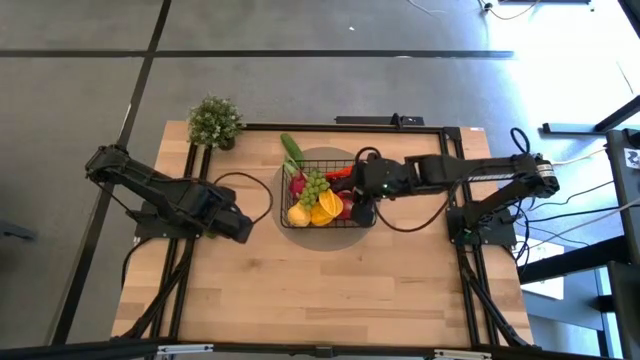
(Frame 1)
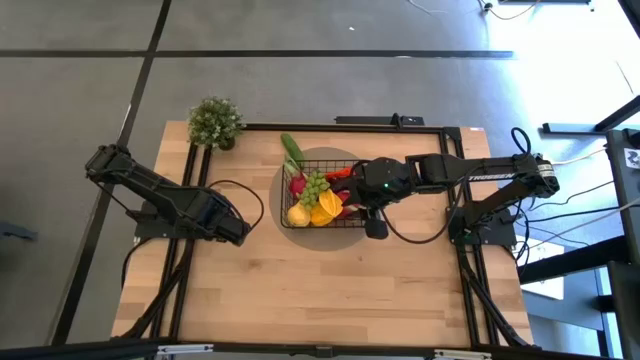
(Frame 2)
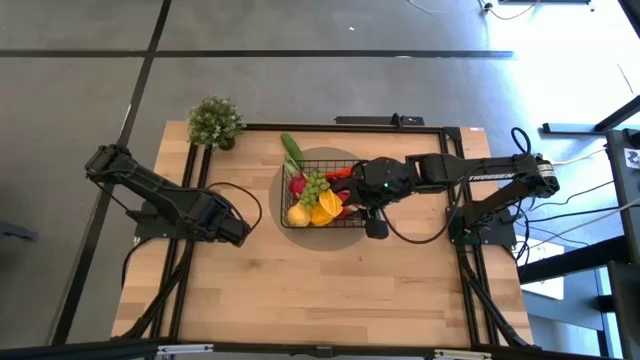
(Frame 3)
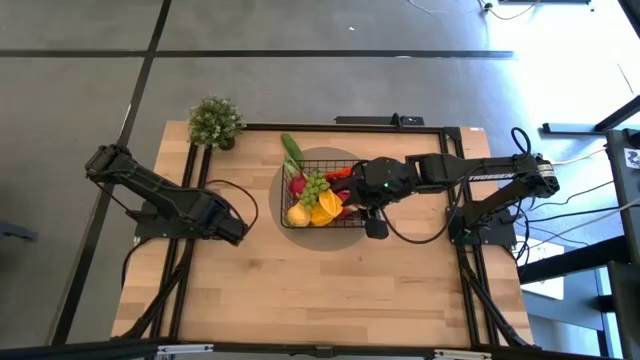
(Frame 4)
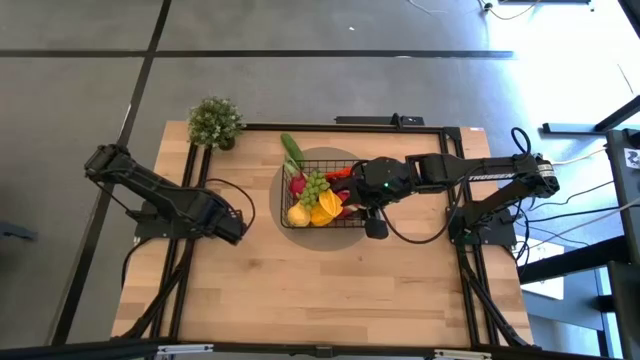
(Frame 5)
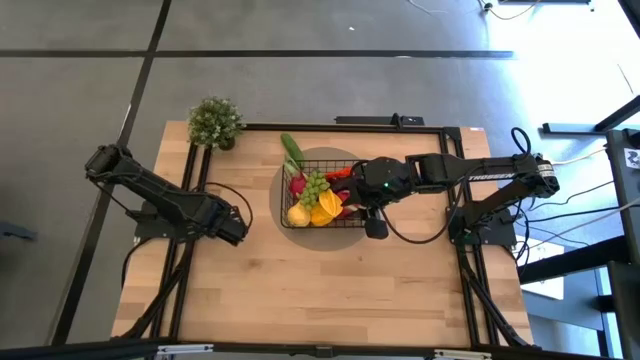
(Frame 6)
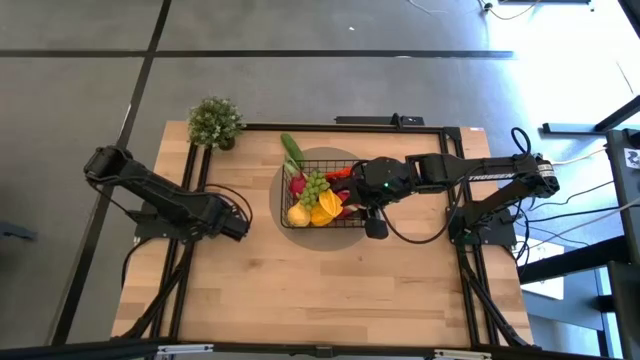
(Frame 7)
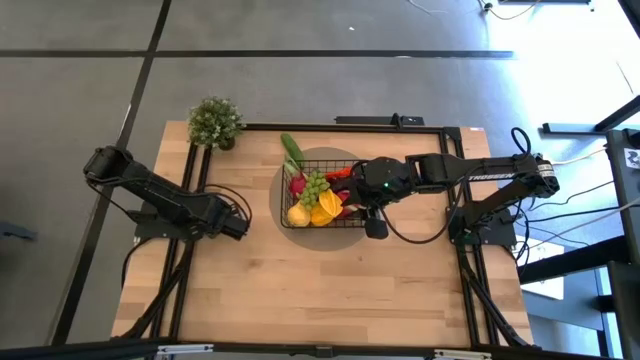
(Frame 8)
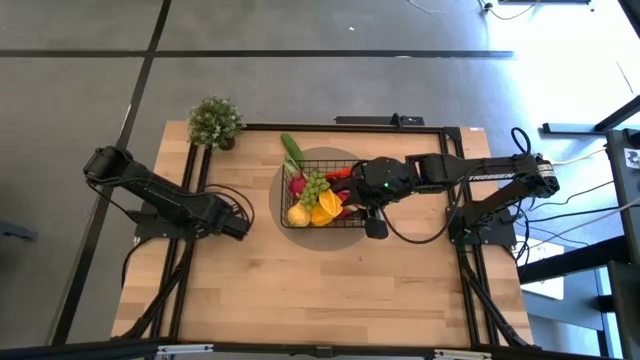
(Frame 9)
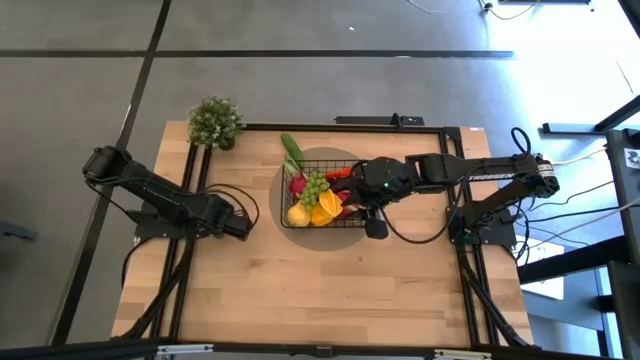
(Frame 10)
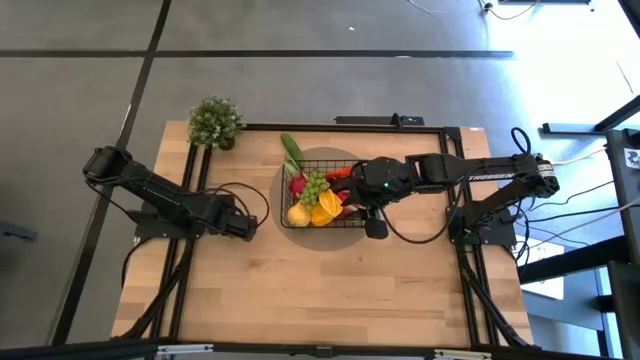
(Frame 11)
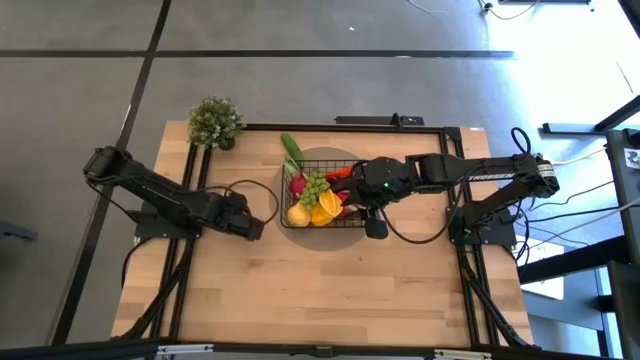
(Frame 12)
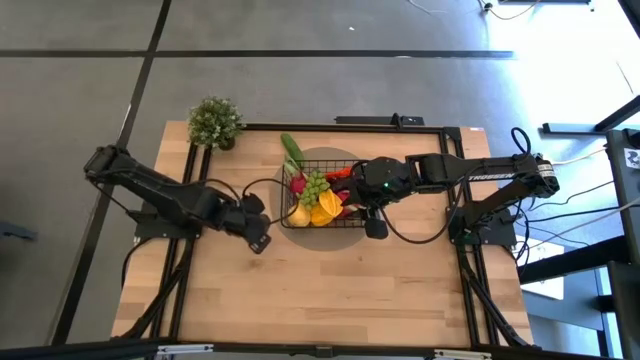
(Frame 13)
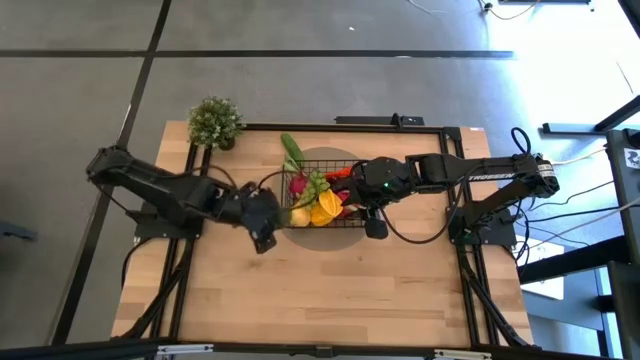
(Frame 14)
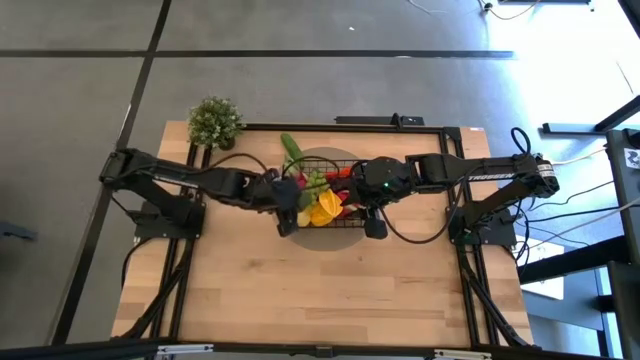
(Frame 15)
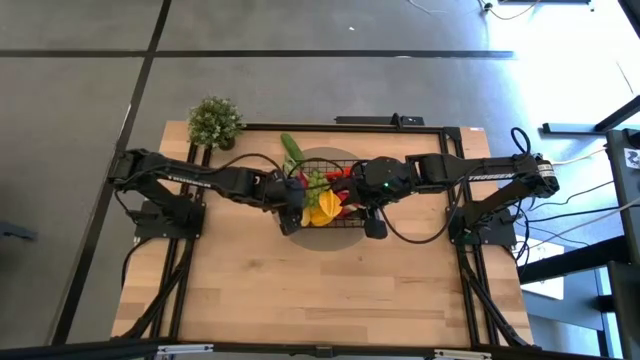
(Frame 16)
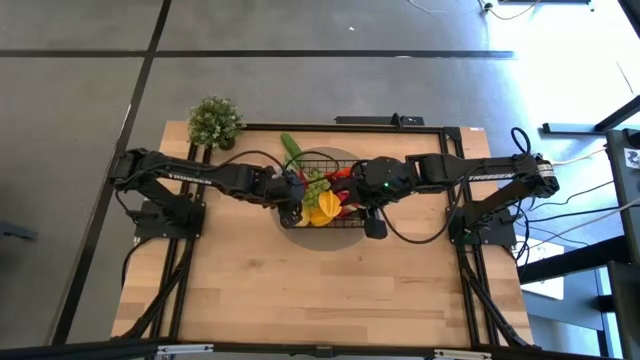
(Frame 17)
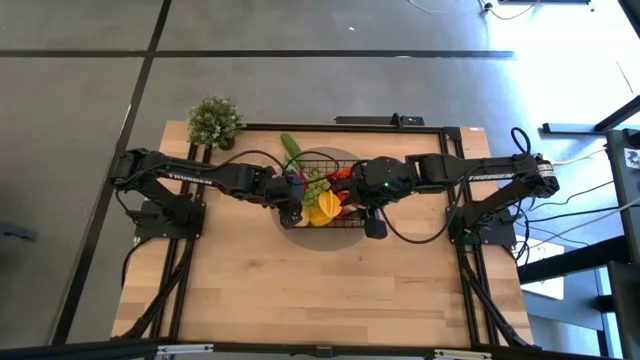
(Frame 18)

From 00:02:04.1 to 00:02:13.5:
Task: Build produce basket
Put the green lime into the black wire basket

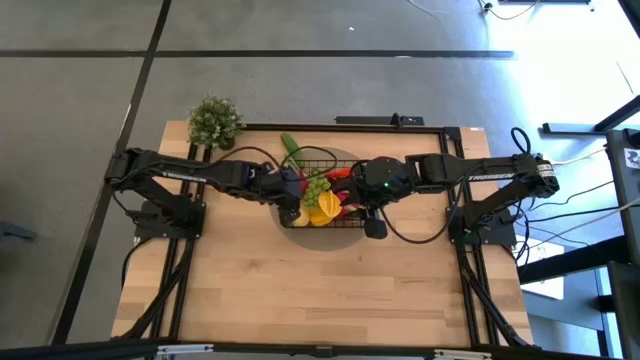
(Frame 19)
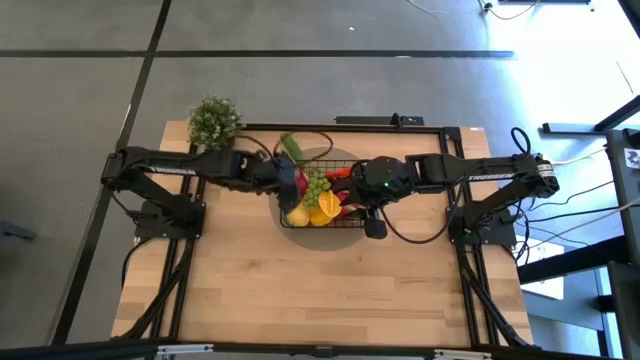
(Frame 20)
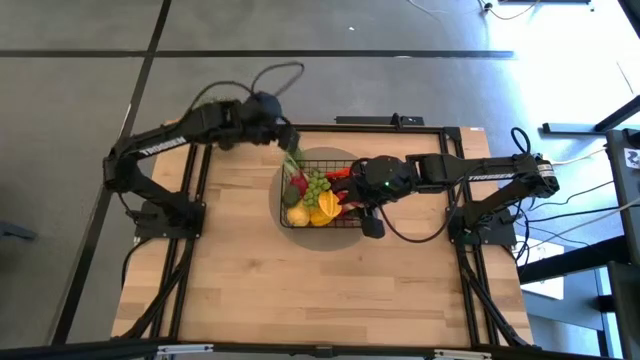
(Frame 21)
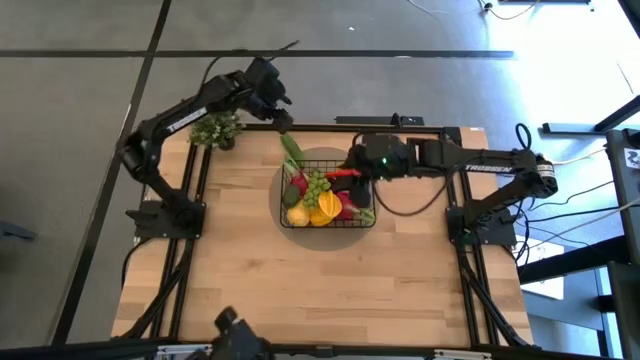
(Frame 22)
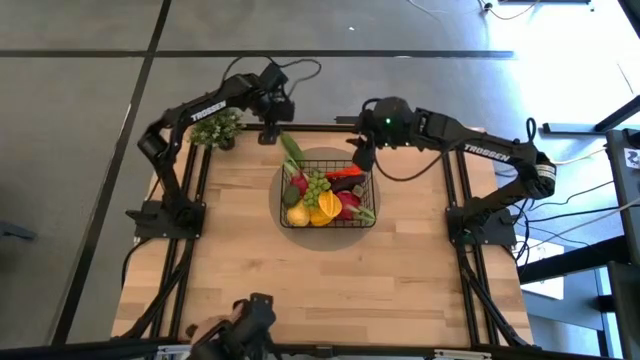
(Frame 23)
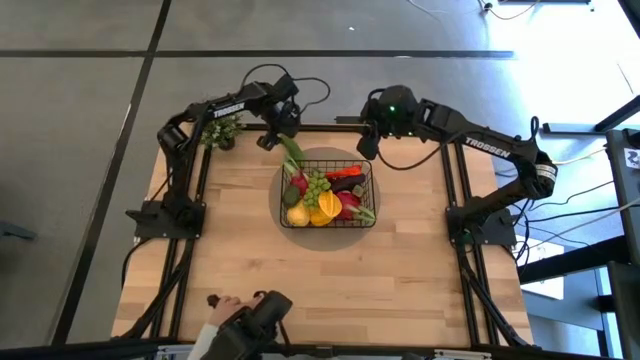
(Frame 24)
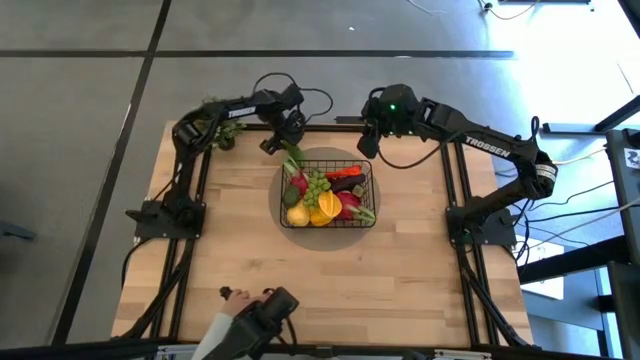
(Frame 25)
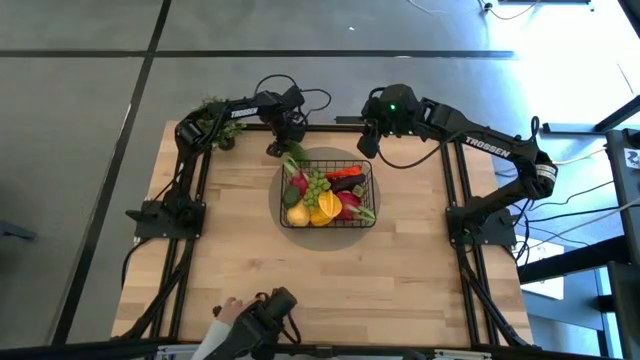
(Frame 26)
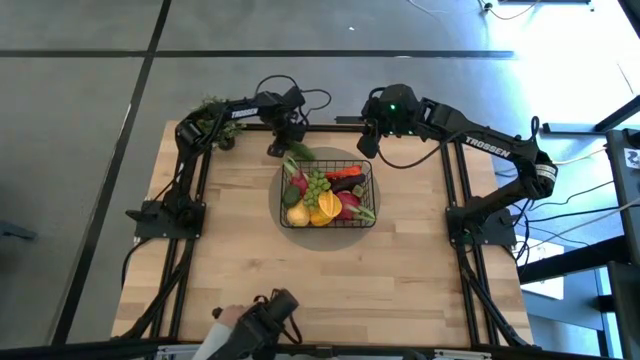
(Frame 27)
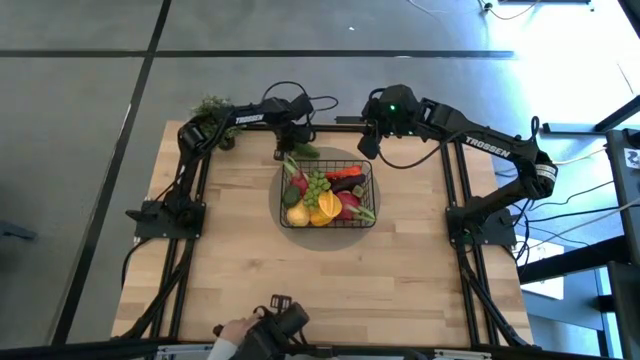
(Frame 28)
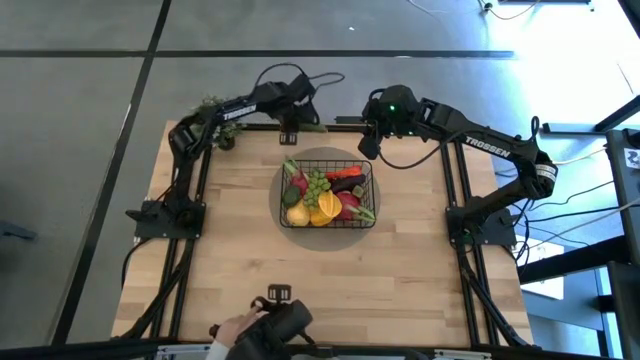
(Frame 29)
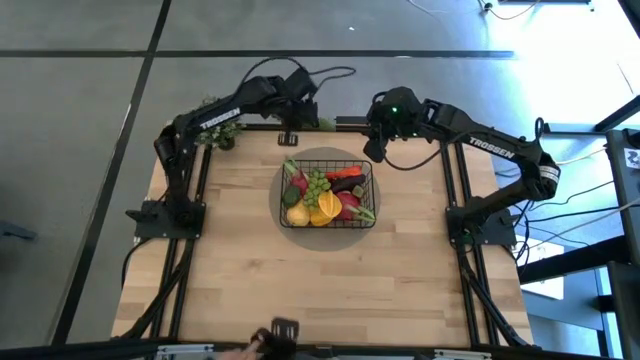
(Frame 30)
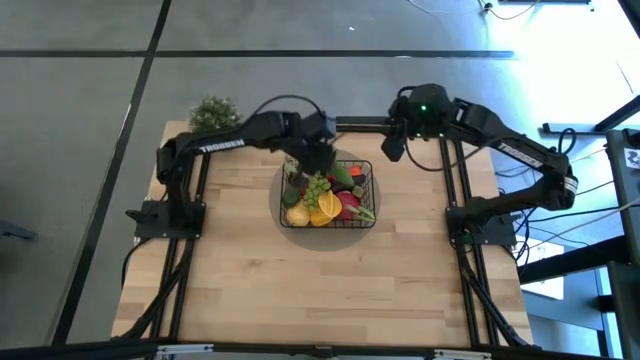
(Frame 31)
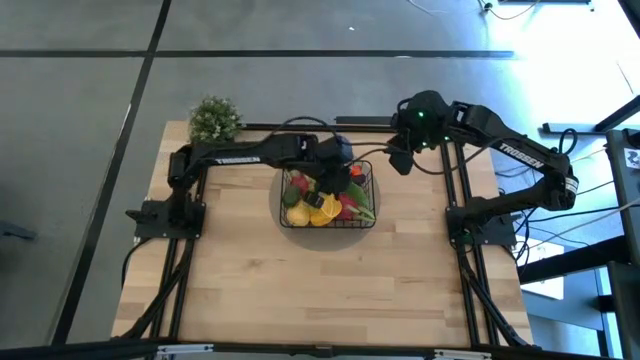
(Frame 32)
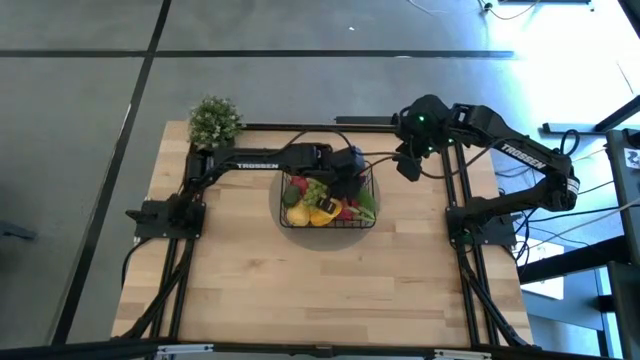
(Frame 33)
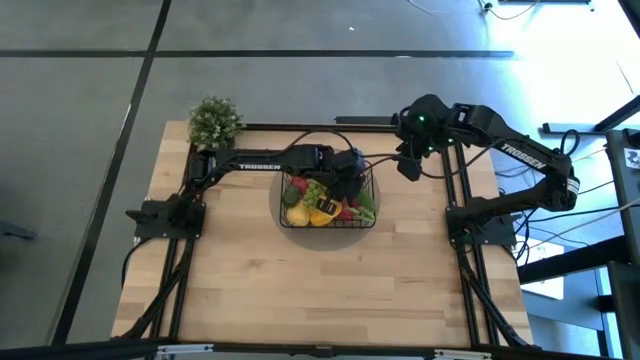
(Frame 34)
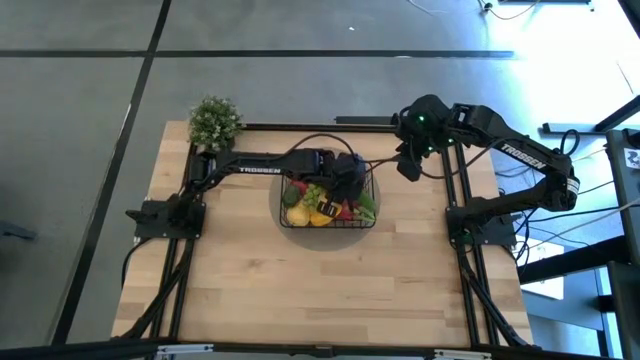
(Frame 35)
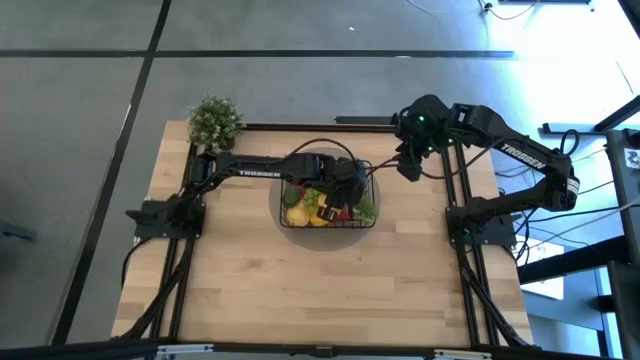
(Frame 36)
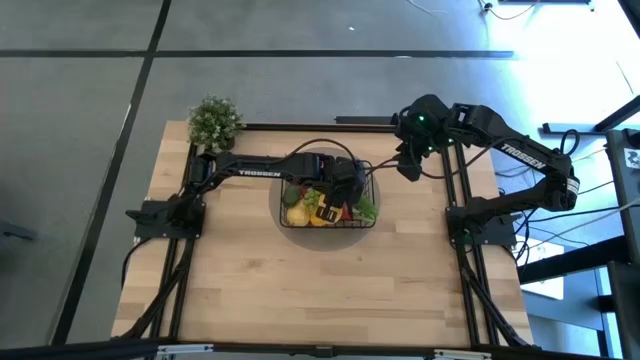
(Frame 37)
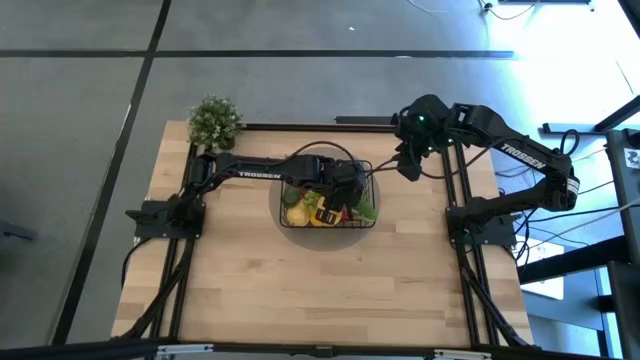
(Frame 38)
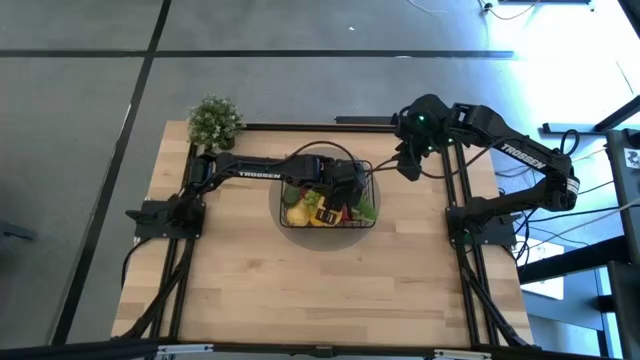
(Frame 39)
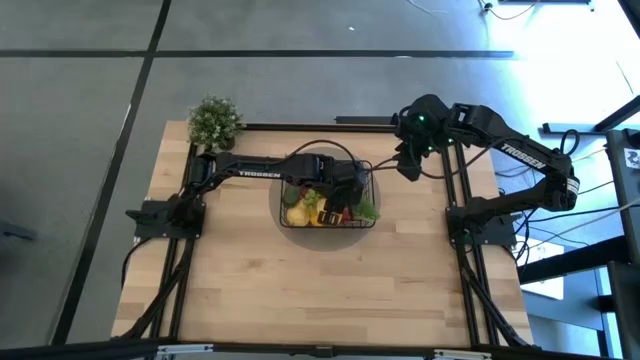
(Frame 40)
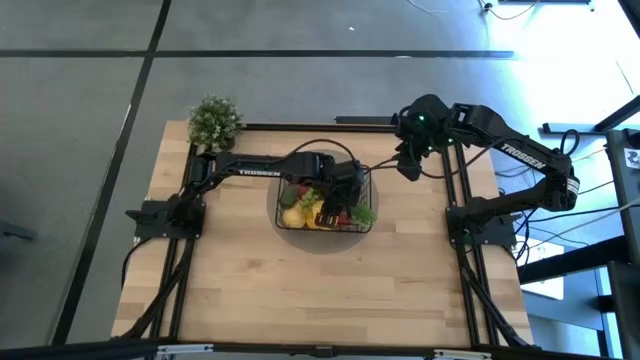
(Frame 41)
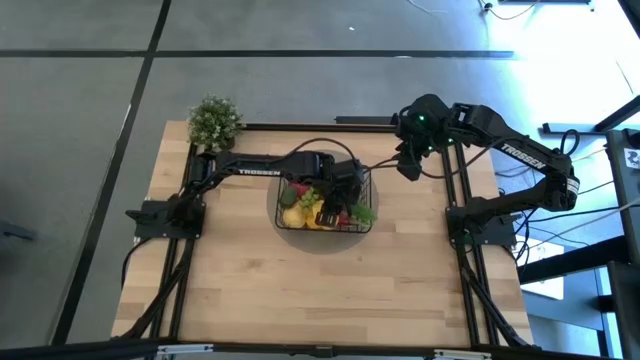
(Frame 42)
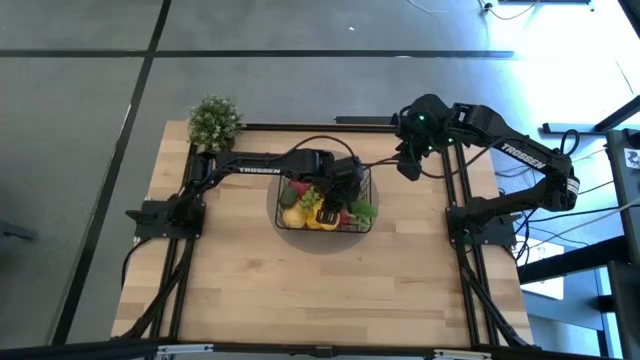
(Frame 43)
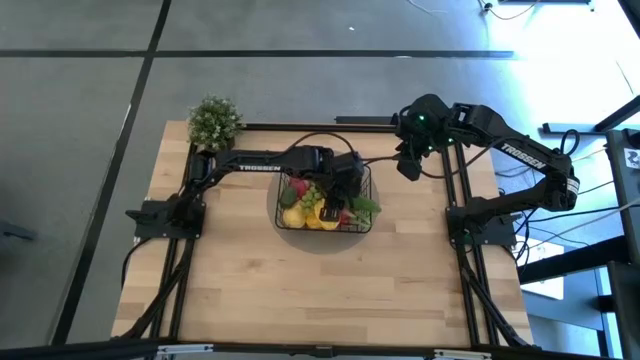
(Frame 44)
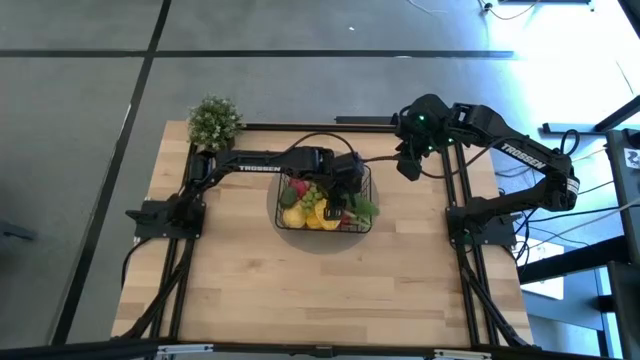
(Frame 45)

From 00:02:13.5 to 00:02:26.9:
Put the green cucumber into the black wire basket
